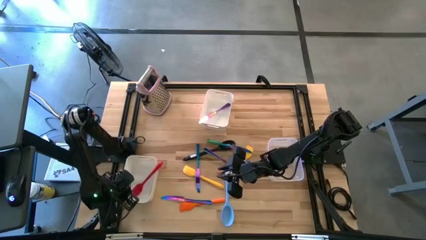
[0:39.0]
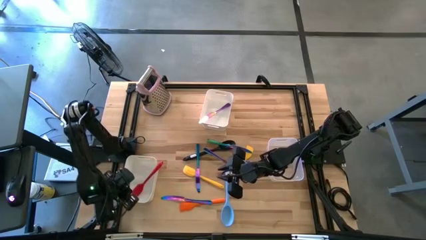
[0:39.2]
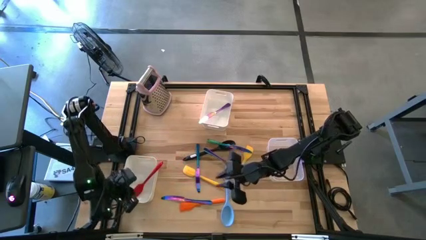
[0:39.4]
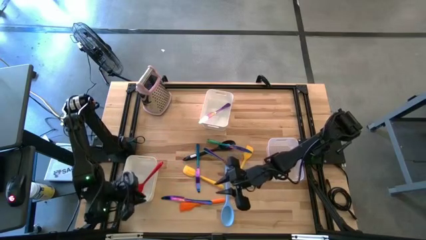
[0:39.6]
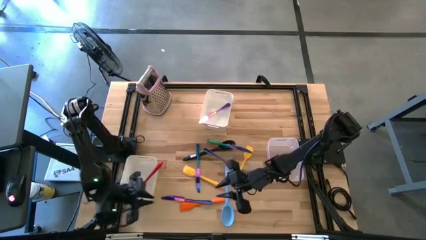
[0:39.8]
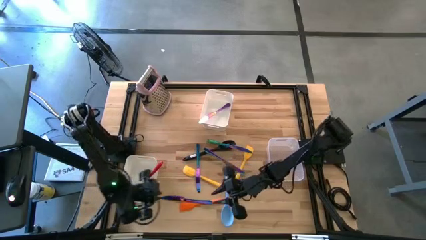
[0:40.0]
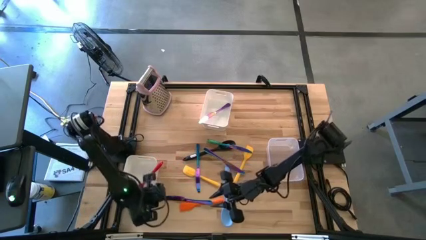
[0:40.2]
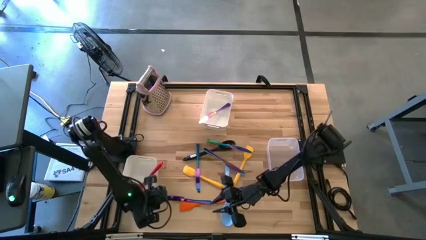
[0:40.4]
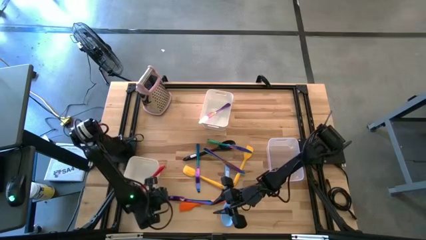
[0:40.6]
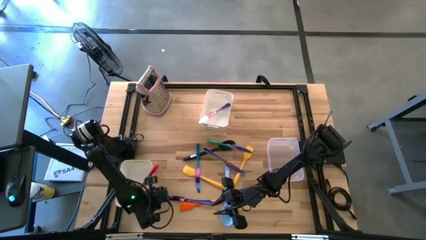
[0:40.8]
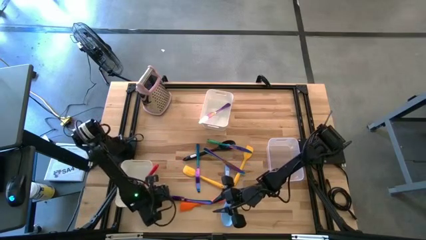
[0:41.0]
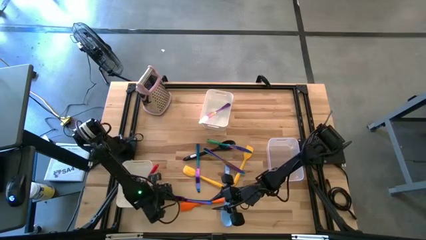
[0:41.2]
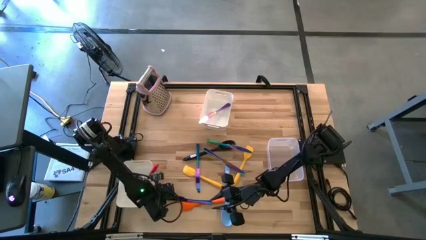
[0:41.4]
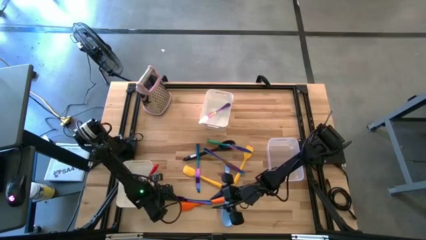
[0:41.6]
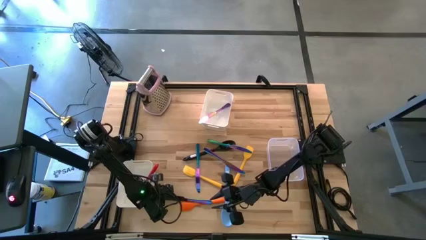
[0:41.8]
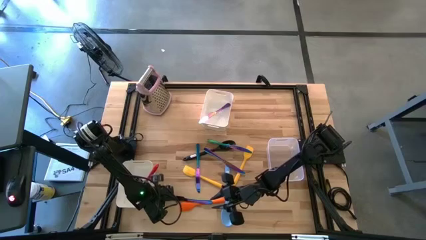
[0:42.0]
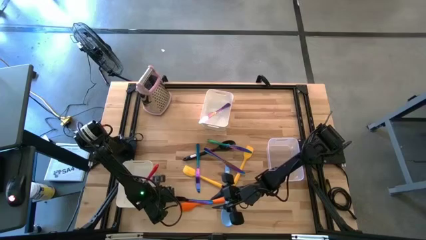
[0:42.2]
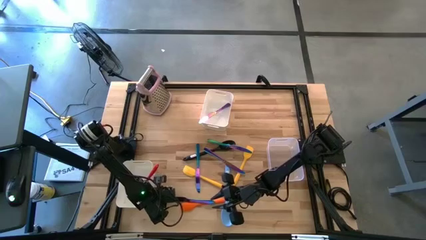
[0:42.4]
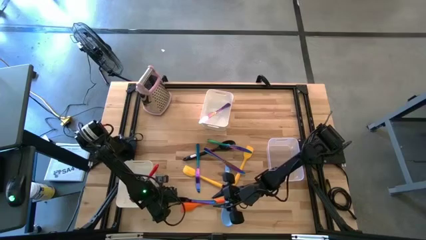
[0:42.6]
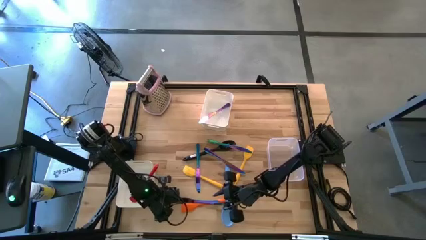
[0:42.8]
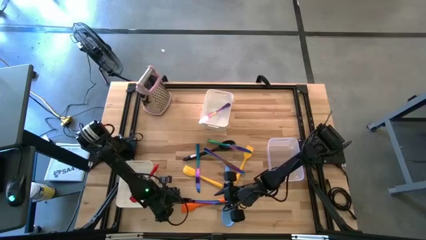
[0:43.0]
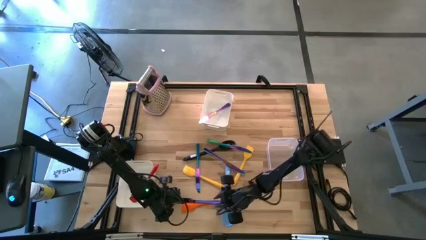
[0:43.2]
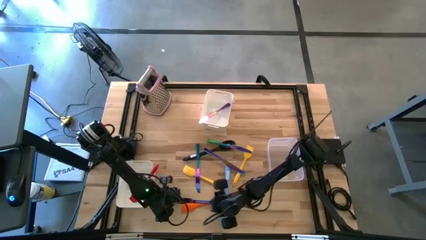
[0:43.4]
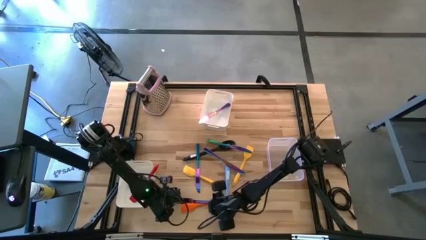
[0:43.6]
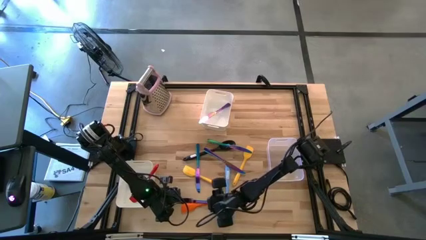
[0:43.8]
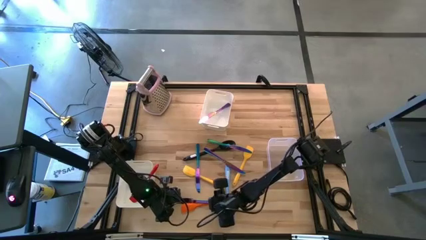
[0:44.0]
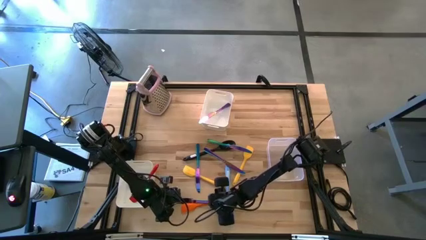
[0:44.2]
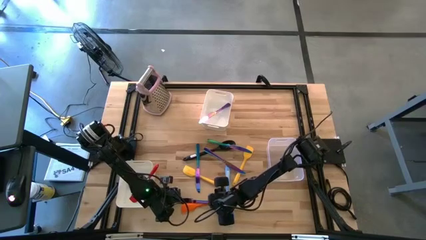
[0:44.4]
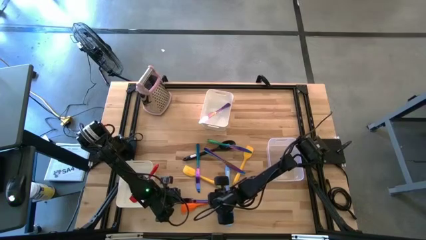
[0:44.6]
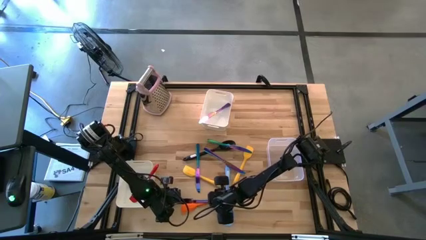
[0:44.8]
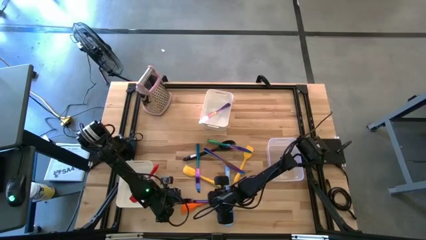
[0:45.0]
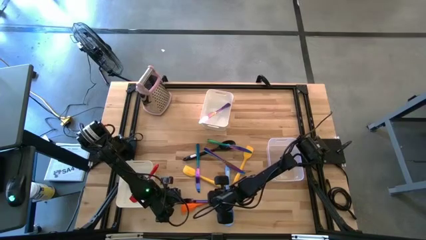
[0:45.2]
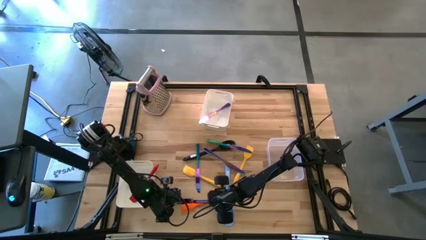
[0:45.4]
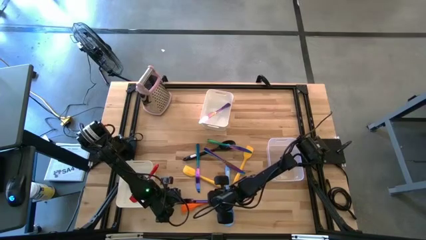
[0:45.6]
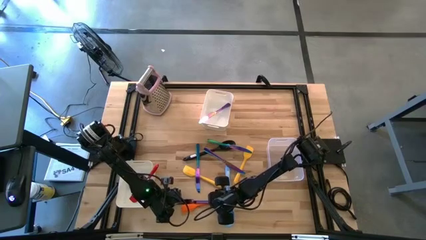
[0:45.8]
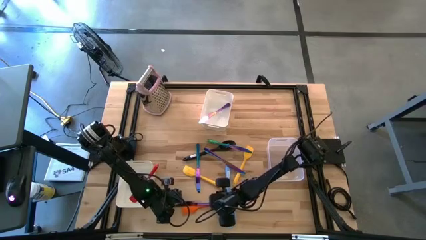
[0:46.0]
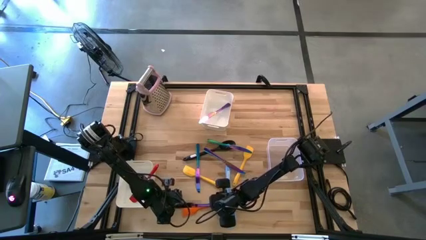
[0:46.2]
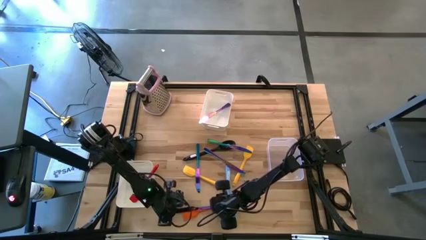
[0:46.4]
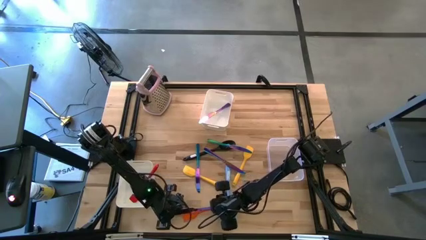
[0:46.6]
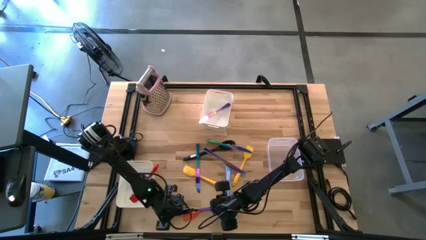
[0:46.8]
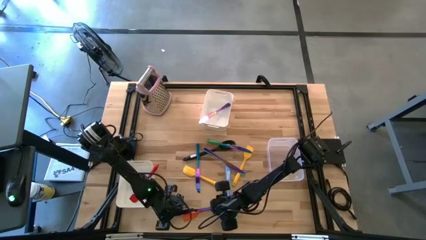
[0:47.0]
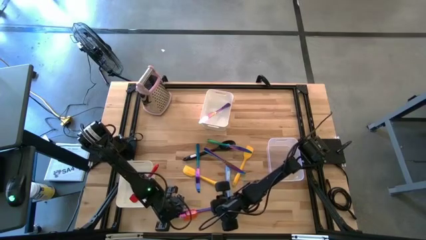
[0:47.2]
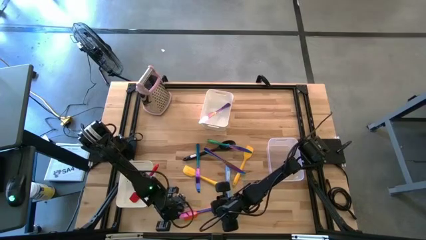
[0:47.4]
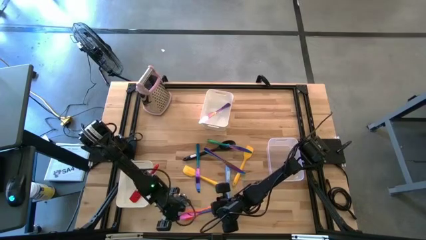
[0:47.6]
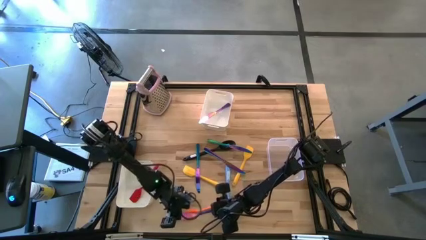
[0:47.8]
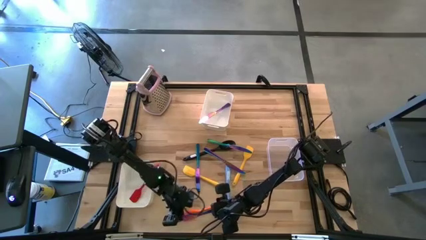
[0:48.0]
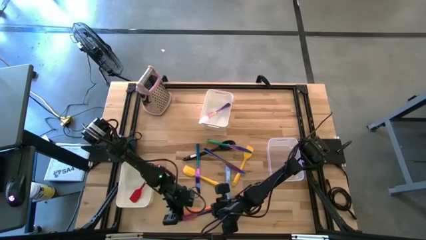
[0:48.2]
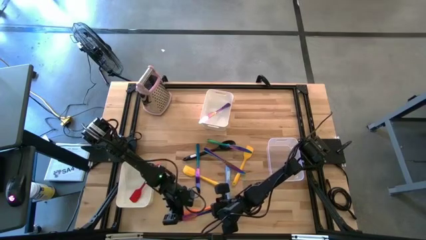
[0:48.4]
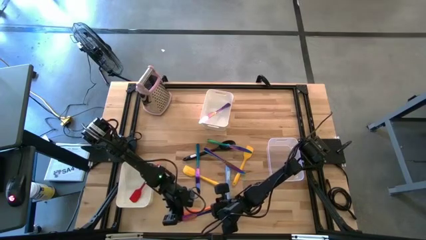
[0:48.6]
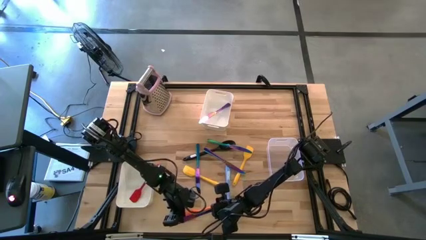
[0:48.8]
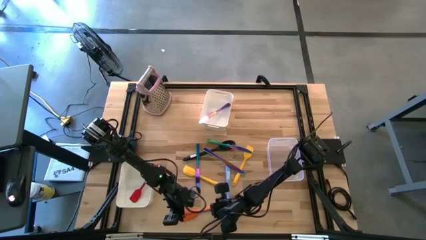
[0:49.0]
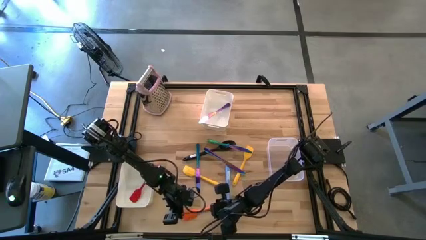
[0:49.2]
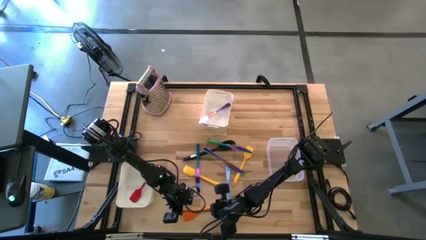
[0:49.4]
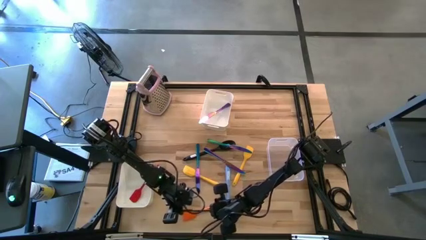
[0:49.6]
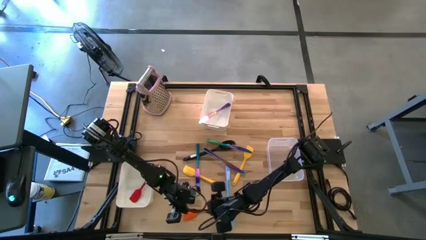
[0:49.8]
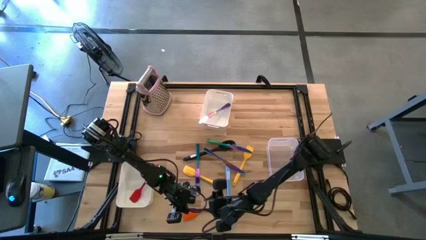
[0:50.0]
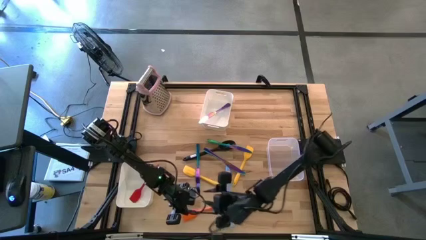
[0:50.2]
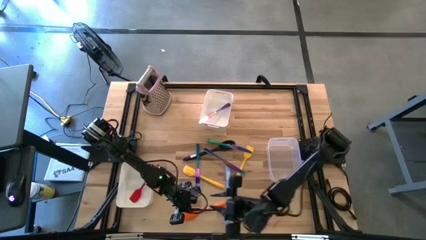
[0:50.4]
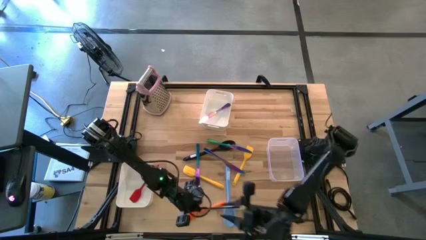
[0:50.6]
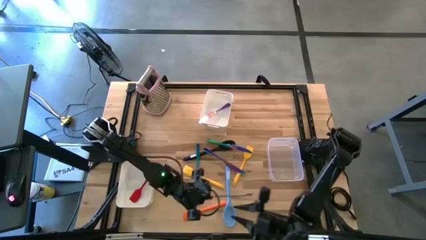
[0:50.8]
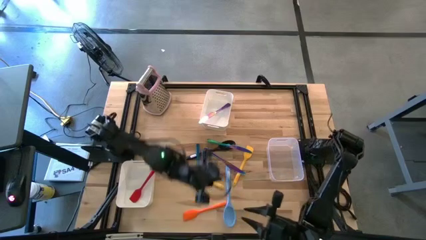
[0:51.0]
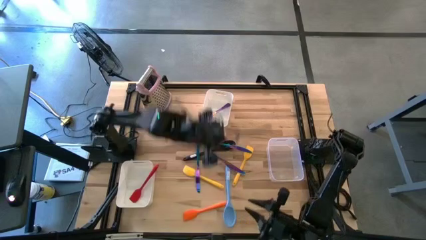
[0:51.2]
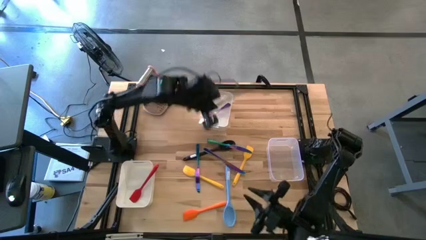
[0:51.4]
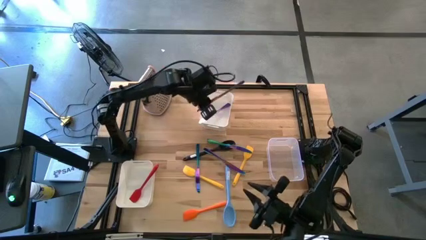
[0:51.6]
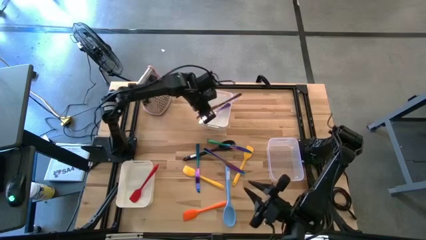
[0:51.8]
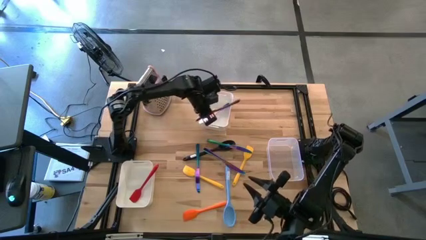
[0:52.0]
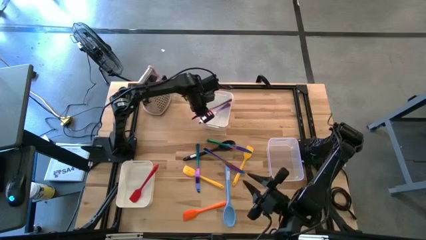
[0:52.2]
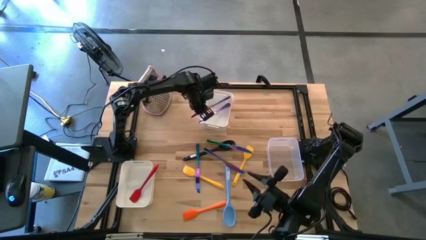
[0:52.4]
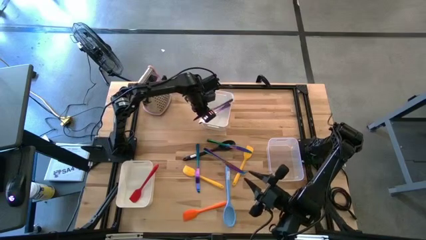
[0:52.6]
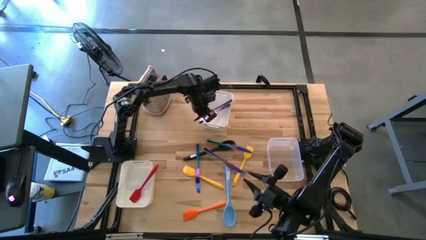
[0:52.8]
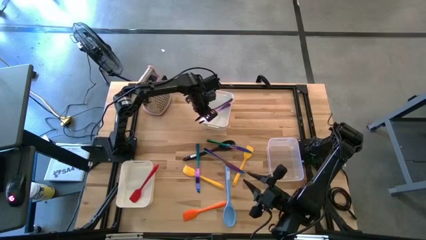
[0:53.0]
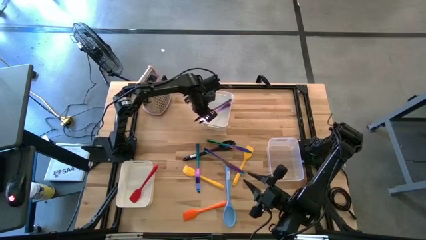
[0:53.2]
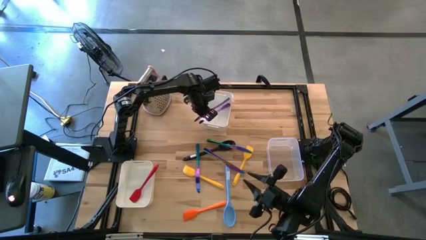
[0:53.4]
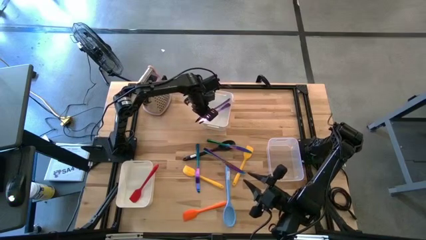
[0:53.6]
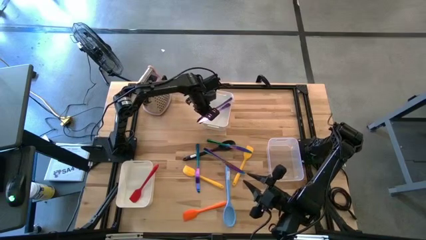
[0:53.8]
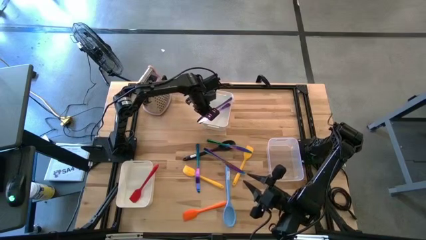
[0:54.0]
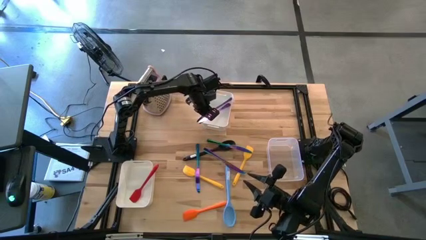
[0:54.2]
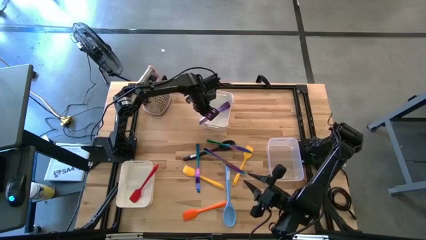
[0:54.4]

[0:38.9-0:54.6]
Task: Pick & Place Kitchen Items
Put the blue table knife into the top white bin
